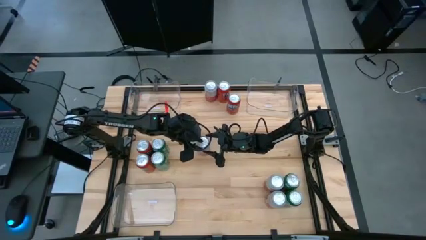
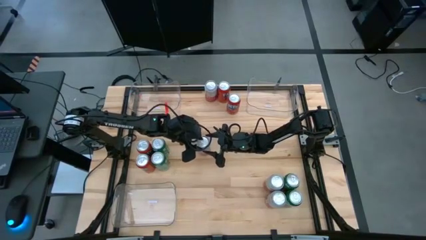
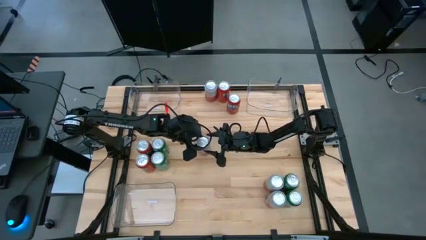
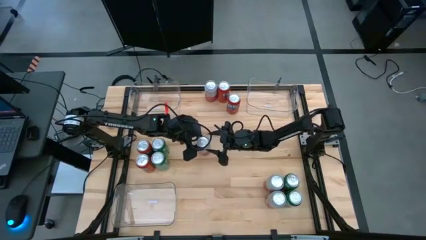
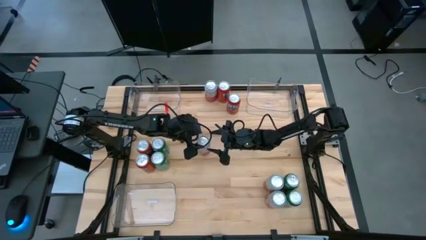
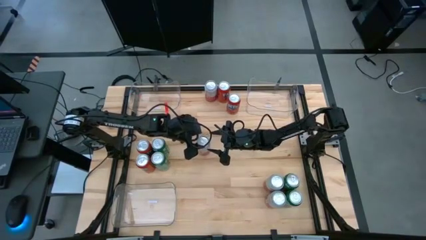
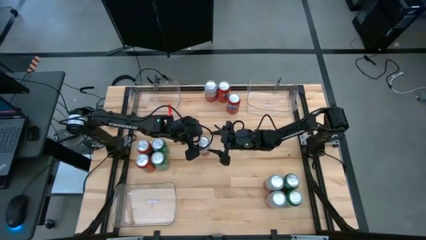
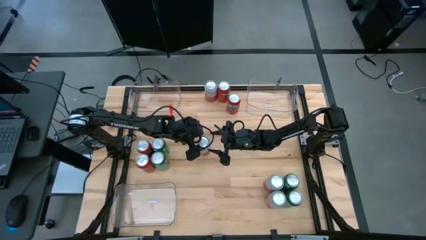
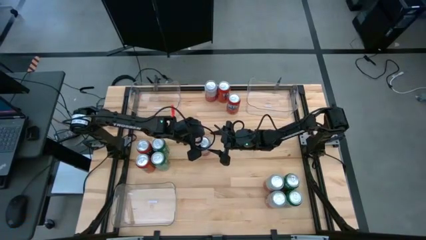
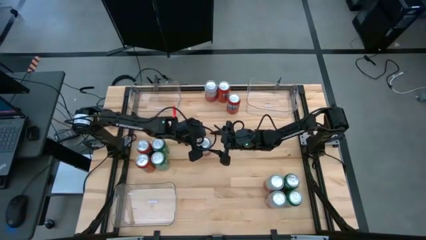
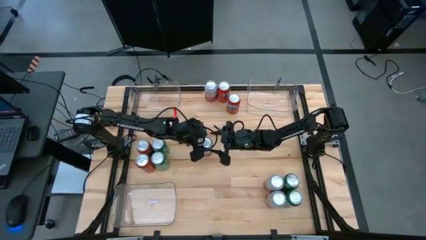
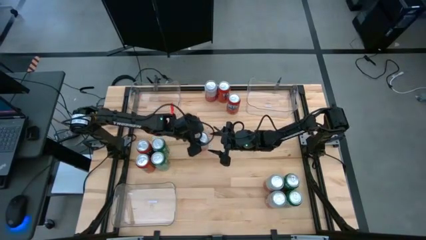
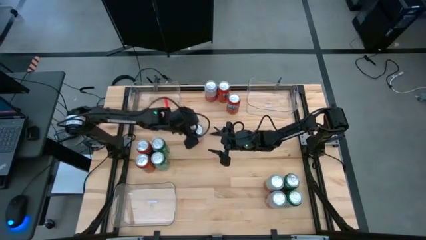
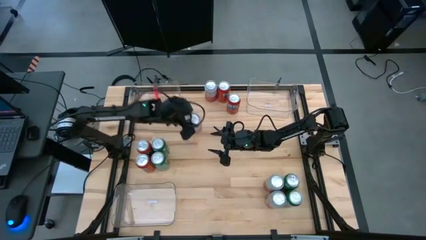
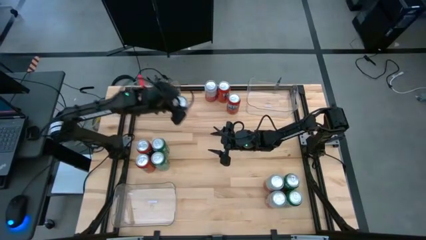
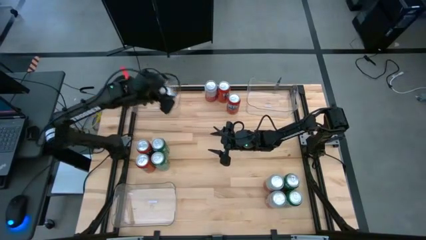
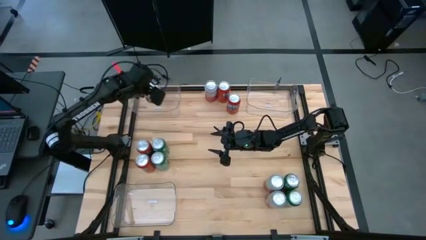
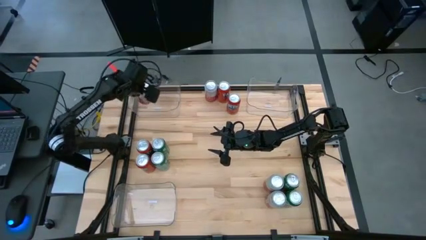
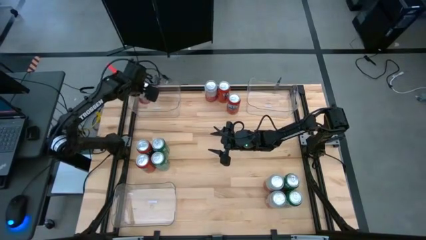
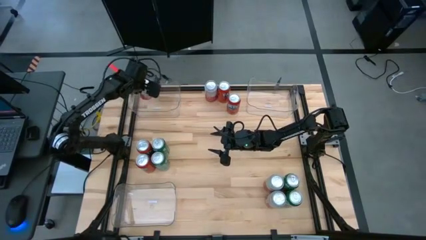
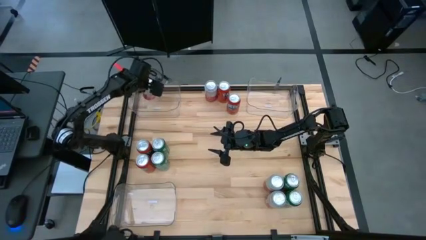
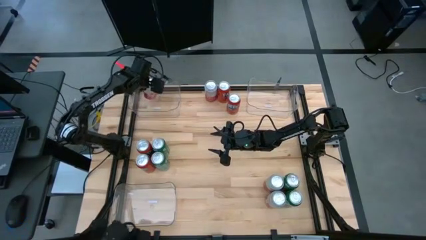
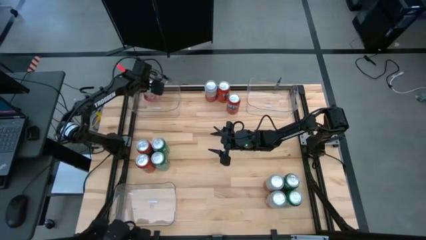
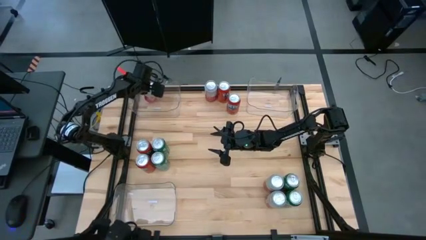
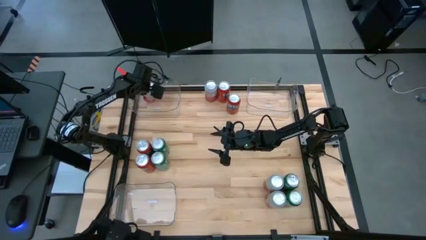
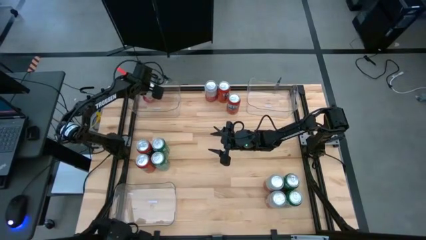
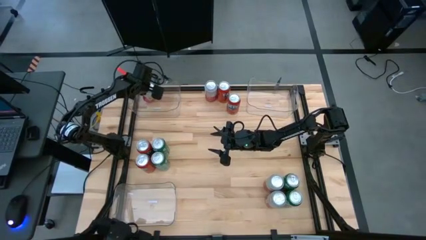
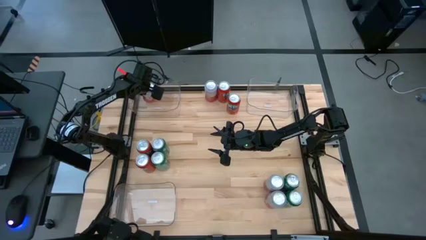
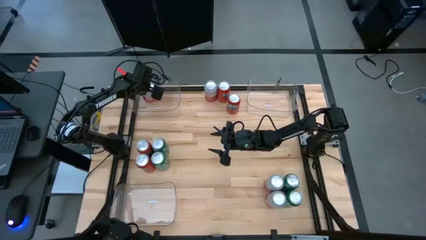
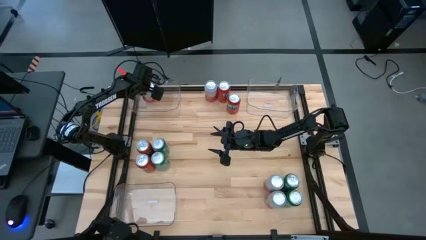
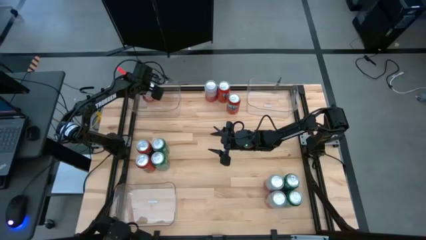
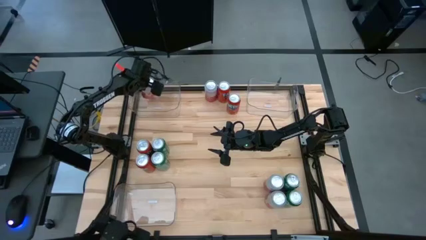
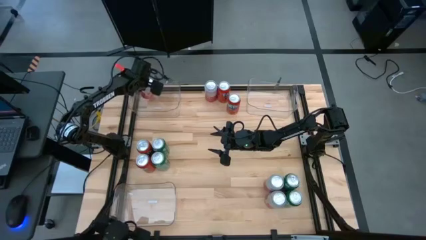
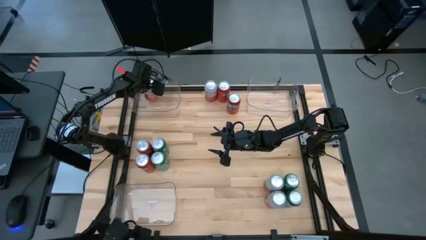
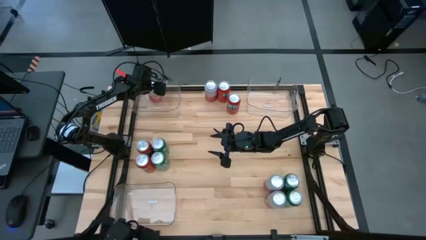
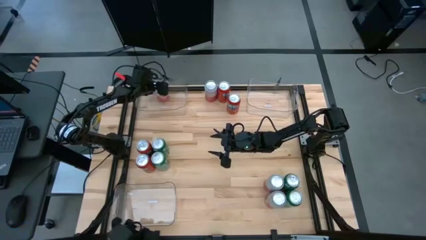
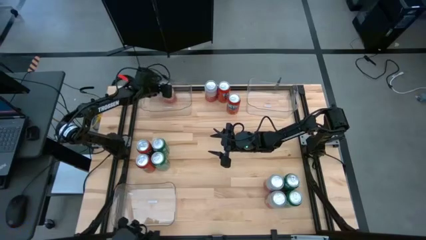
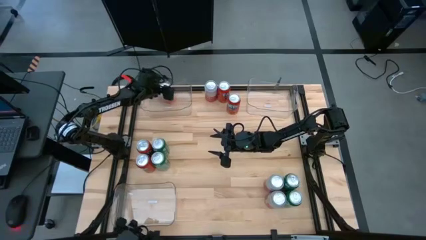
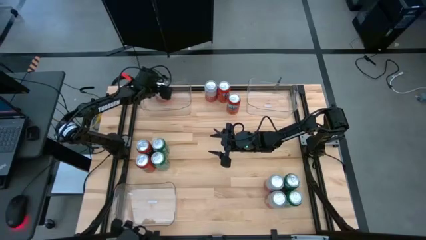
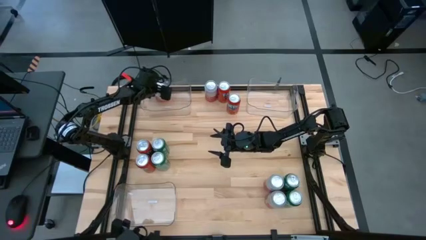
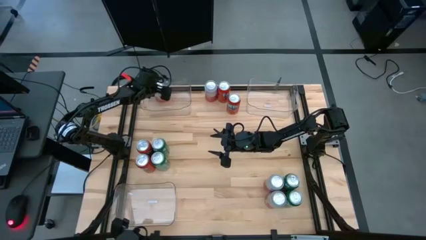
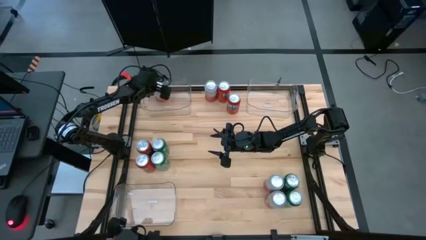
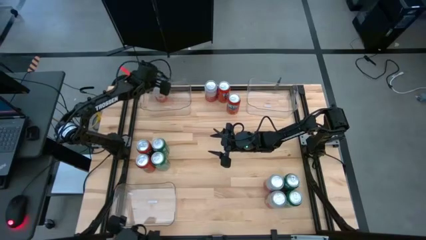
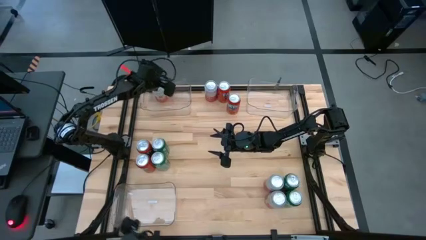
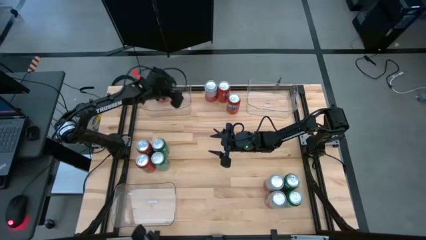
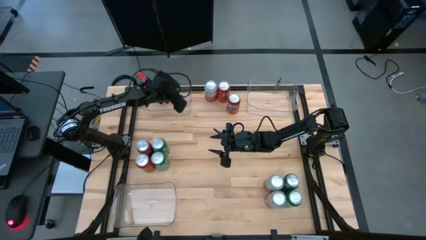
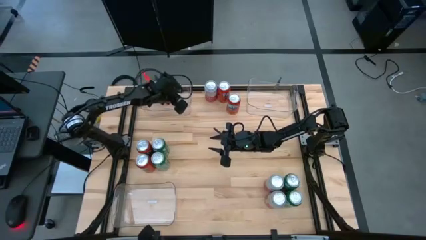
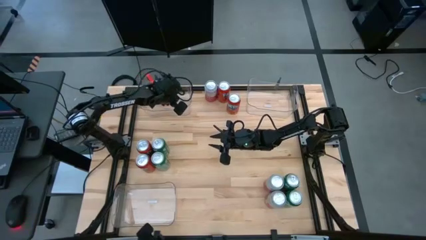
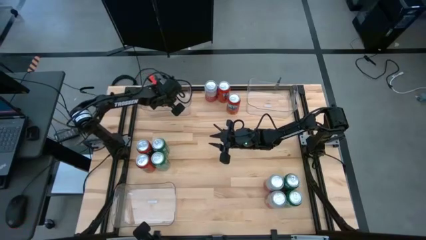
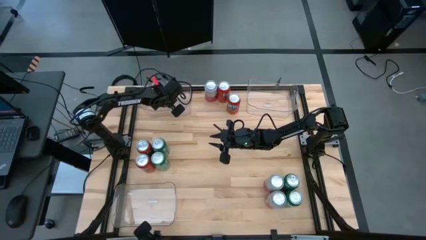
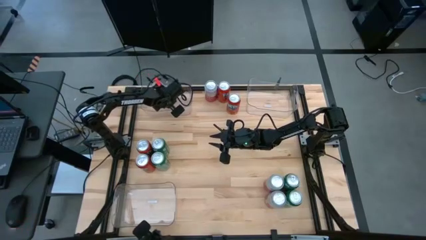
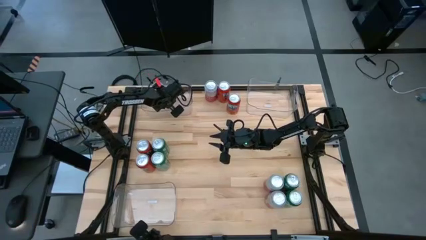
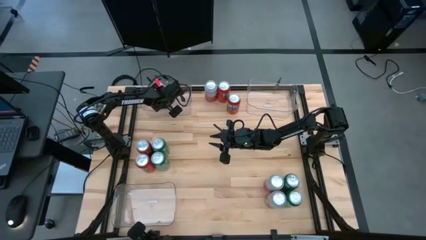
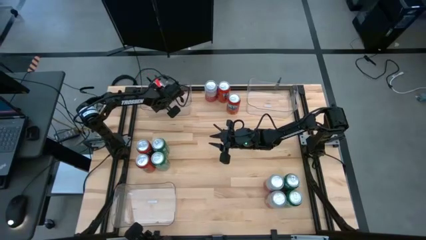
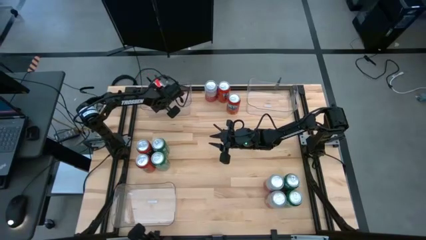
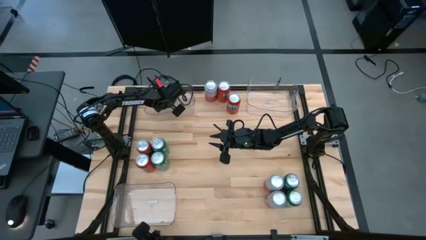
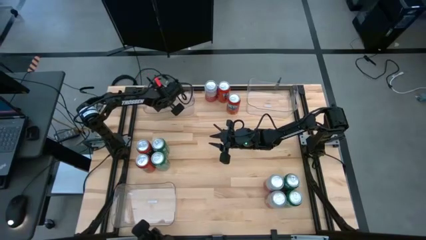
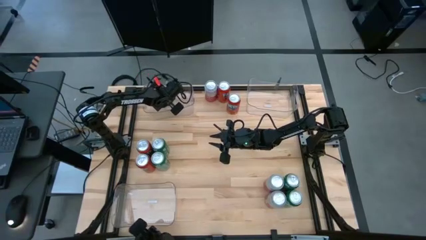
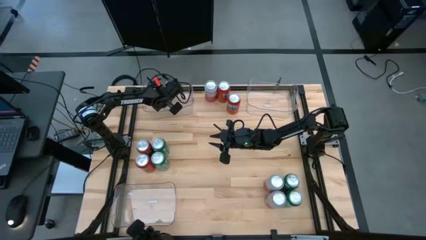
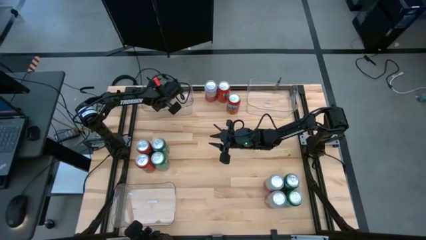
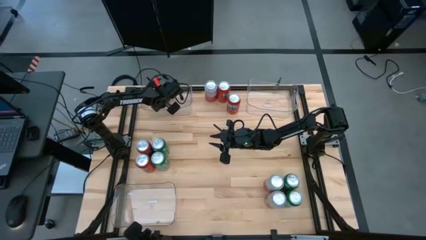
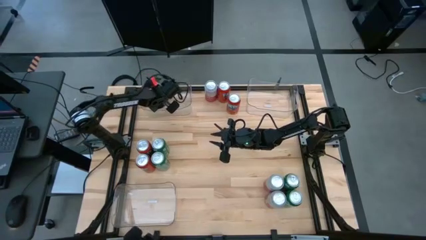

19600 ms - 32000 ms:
Task: Sort soda cans
Put the pink-white soda can into the top left transparent bin

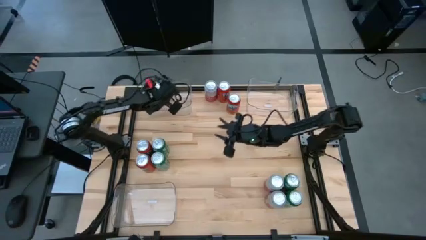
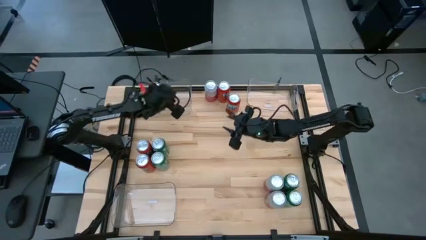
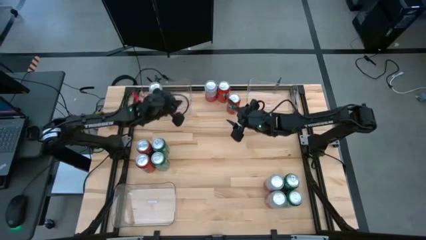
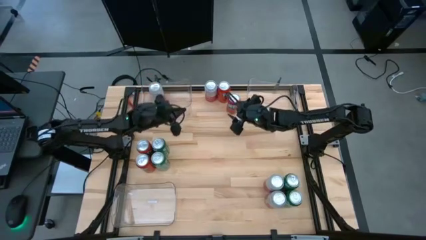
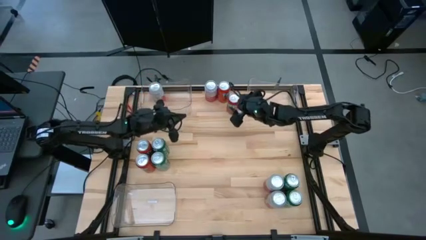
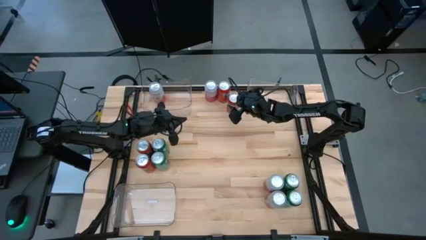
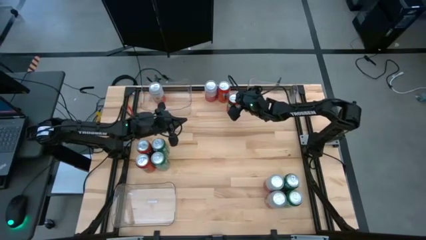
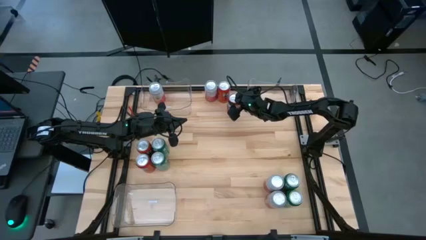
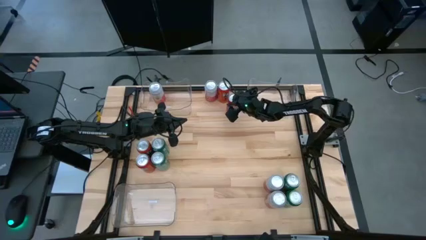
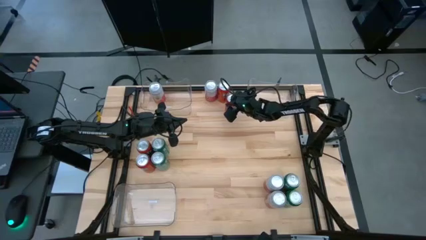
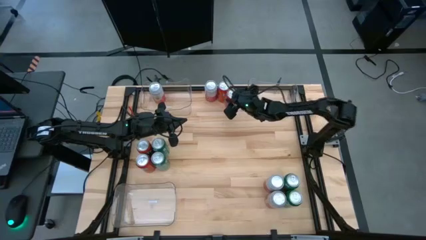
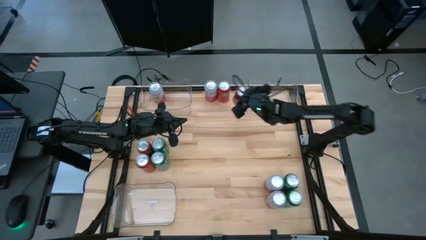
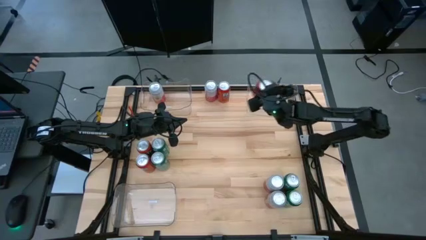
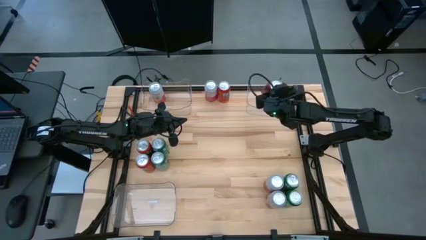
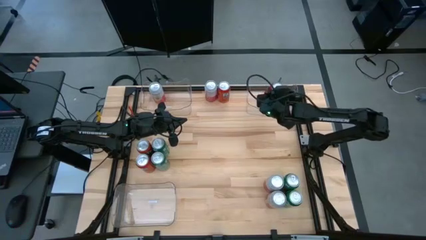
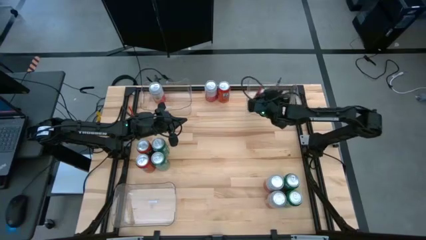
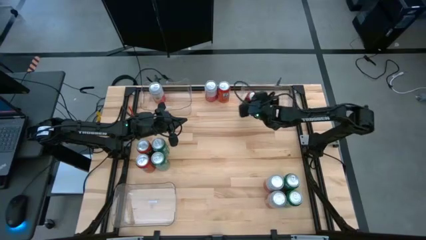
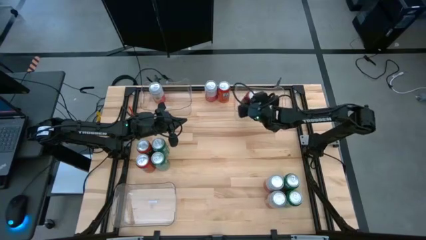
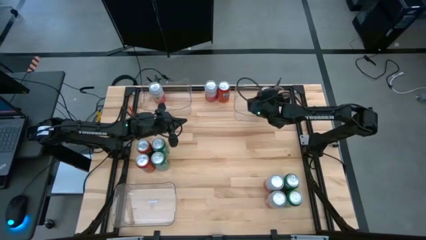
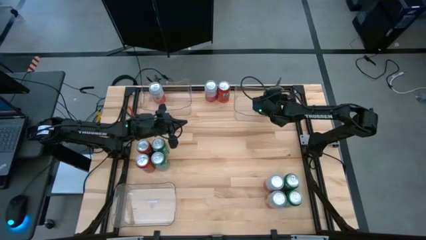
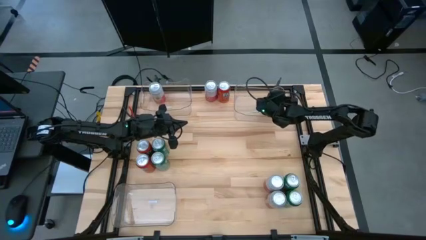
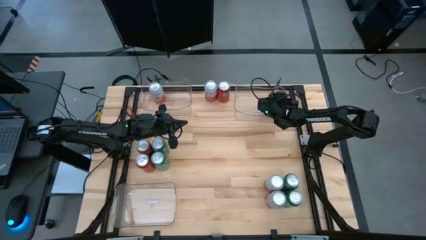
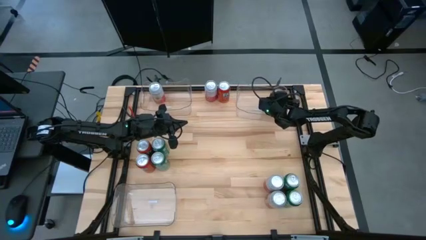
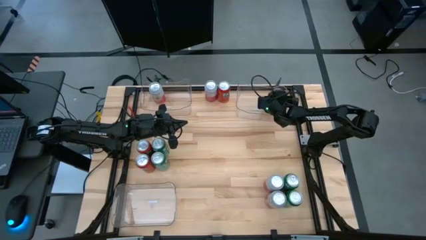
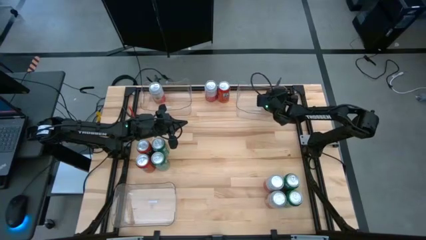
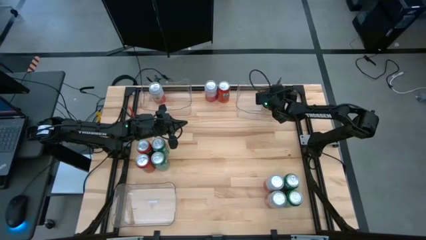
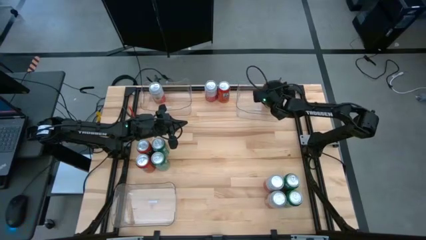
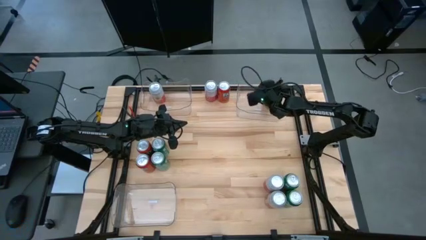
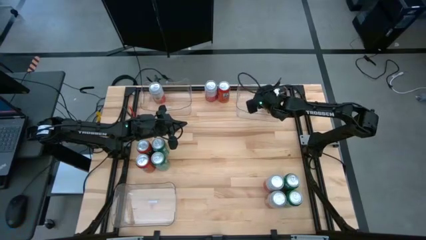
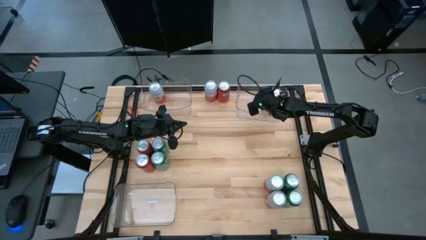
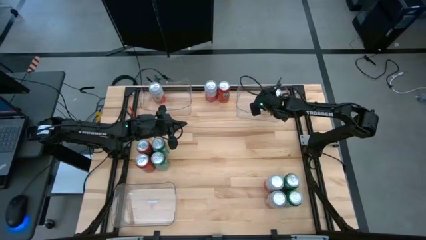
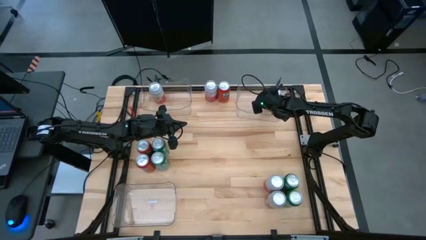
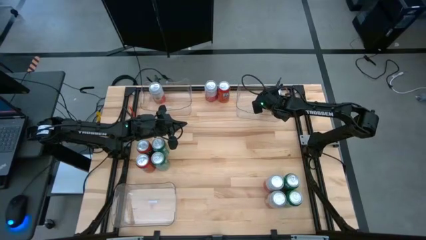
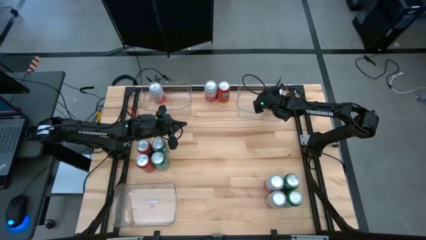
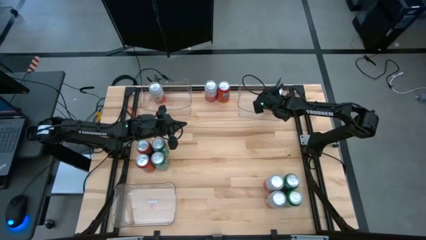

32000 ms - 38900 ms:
Put the red soda can into the top right transparent bin
